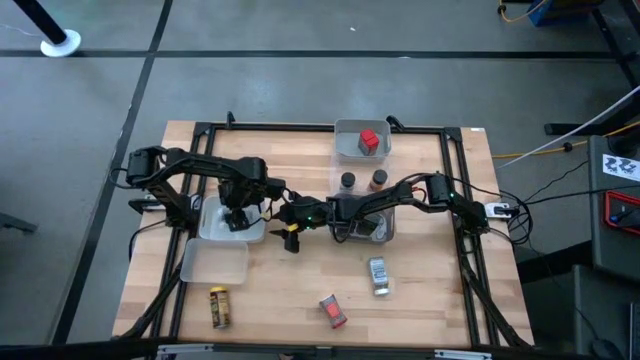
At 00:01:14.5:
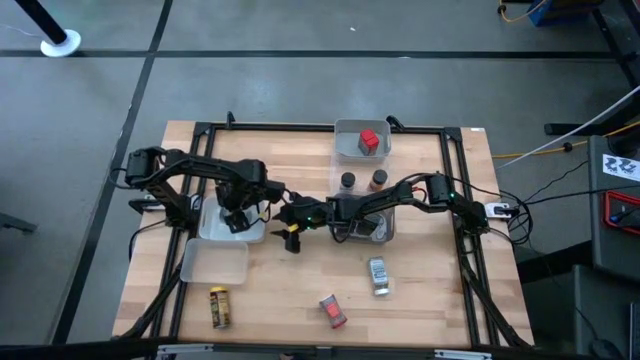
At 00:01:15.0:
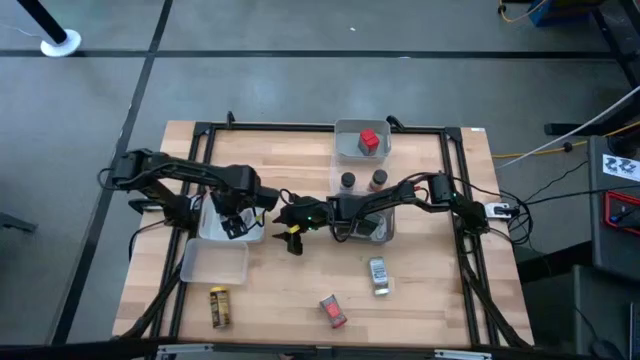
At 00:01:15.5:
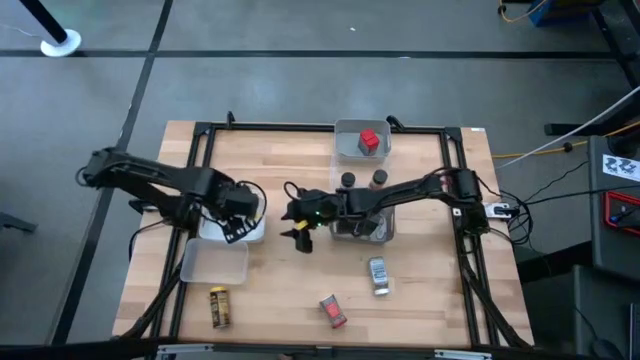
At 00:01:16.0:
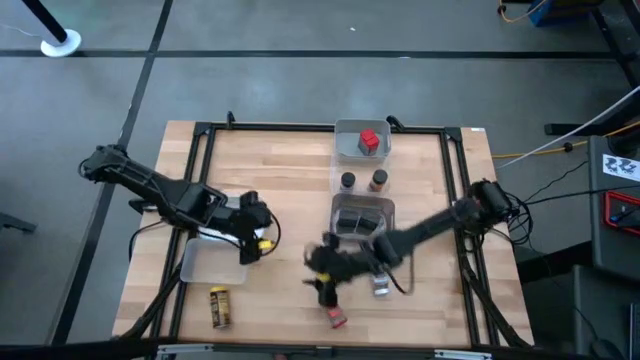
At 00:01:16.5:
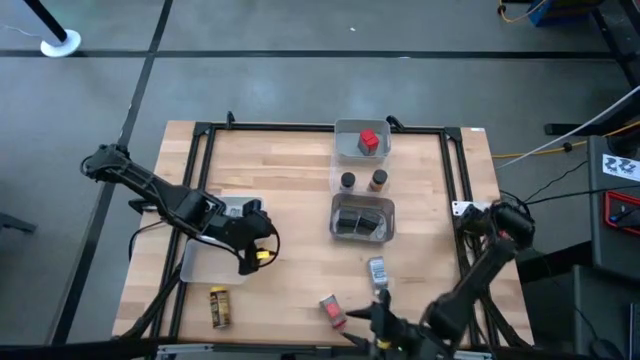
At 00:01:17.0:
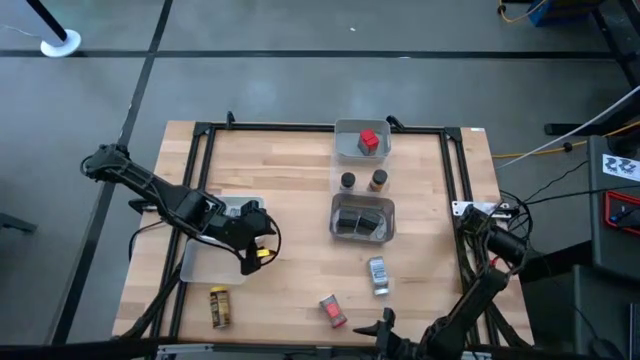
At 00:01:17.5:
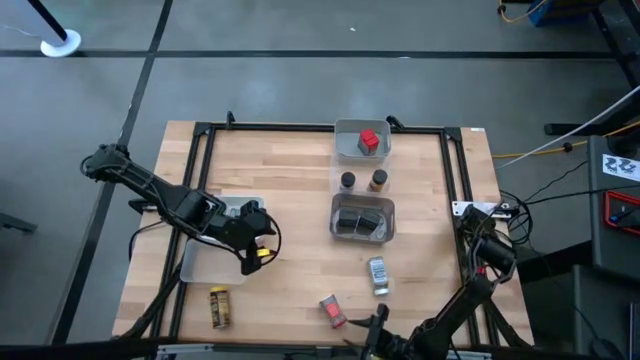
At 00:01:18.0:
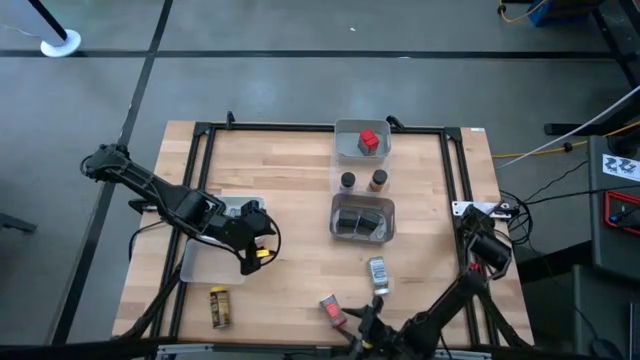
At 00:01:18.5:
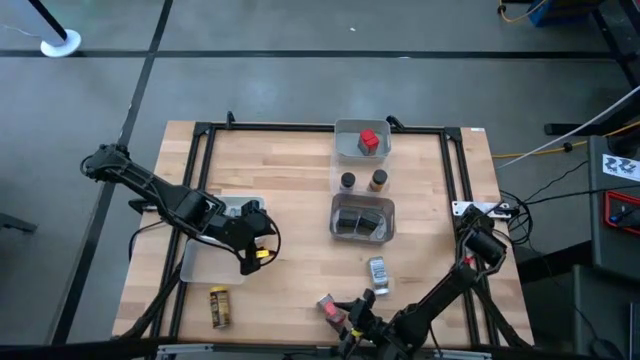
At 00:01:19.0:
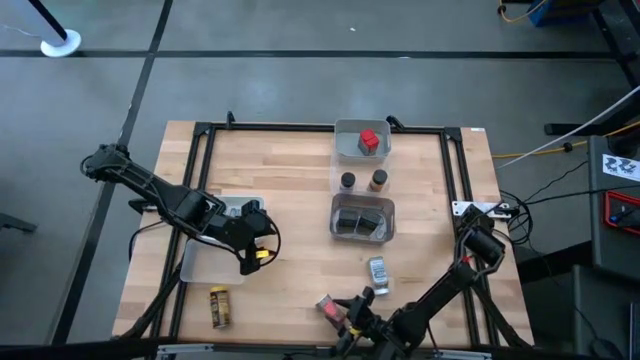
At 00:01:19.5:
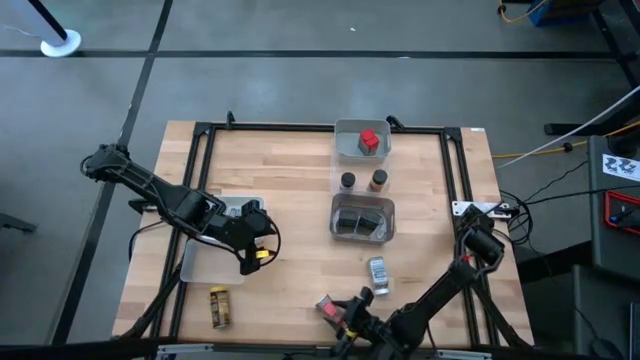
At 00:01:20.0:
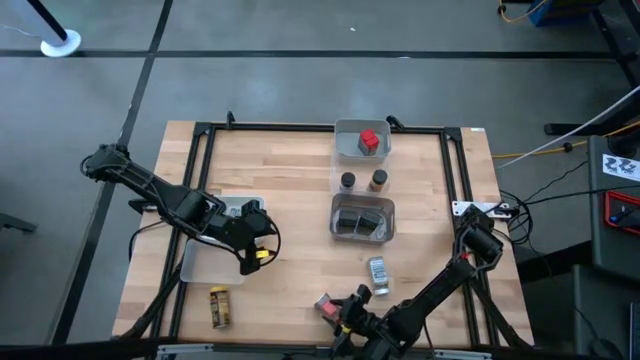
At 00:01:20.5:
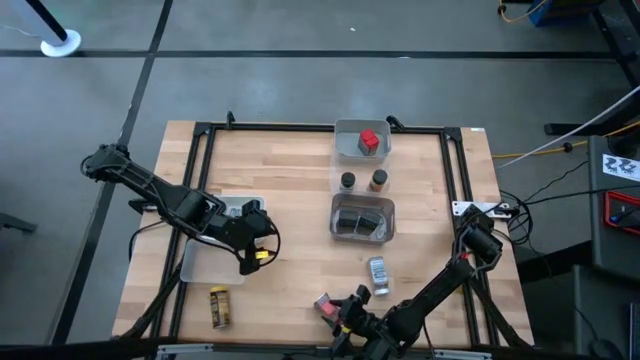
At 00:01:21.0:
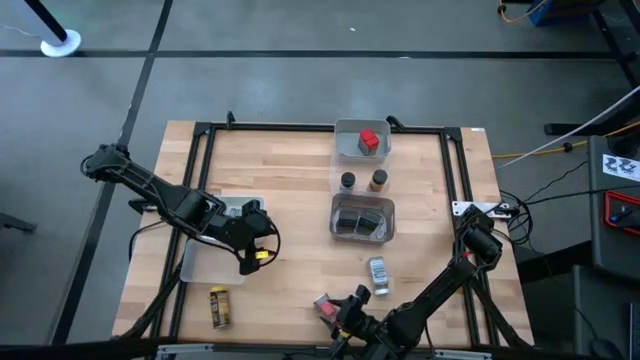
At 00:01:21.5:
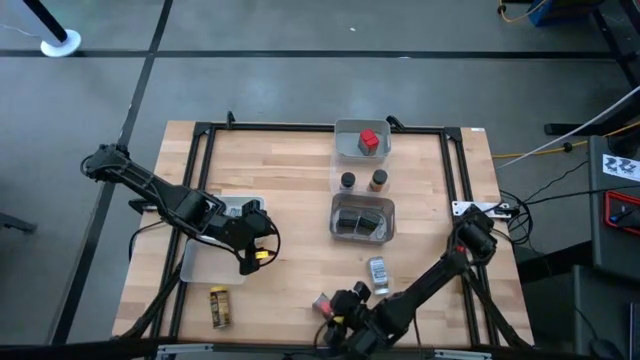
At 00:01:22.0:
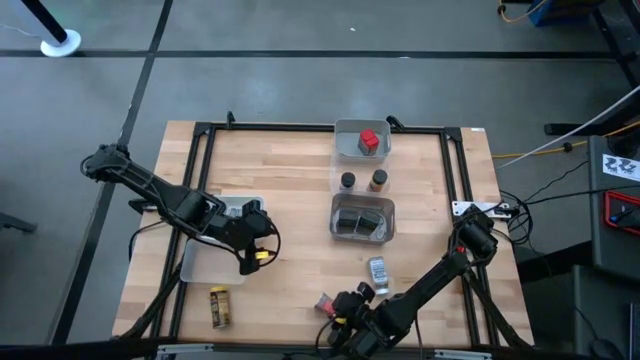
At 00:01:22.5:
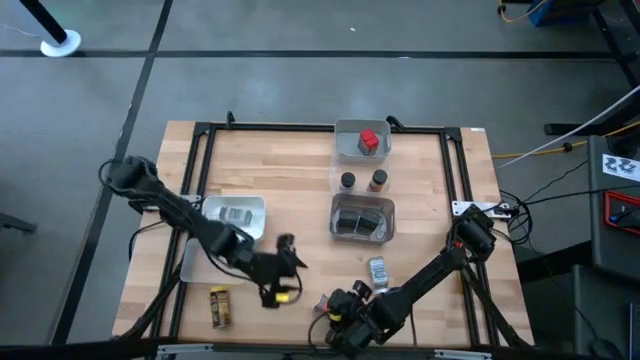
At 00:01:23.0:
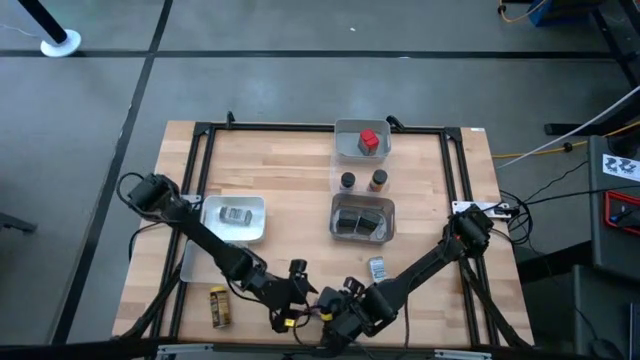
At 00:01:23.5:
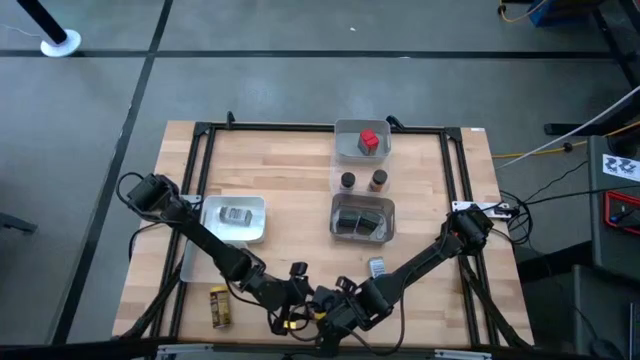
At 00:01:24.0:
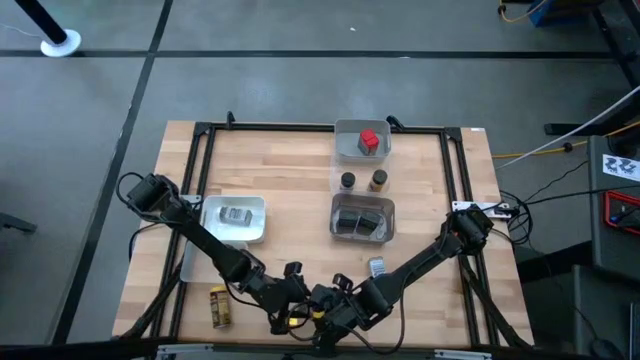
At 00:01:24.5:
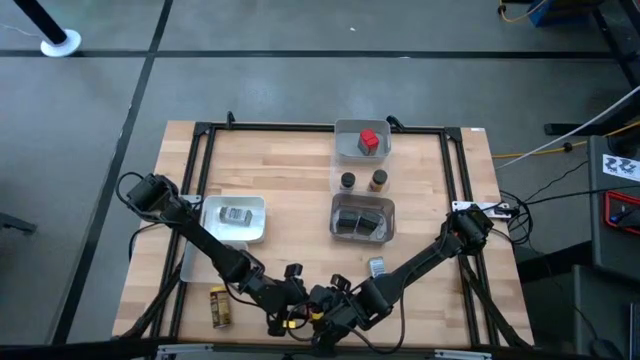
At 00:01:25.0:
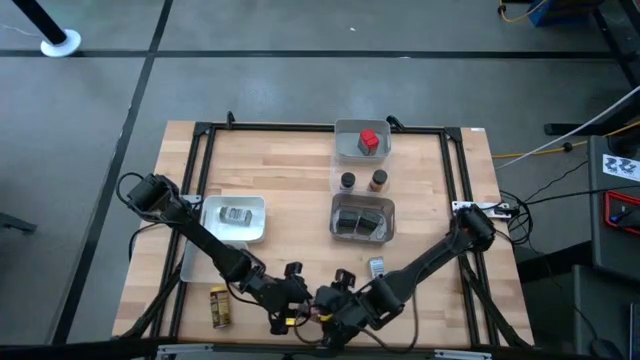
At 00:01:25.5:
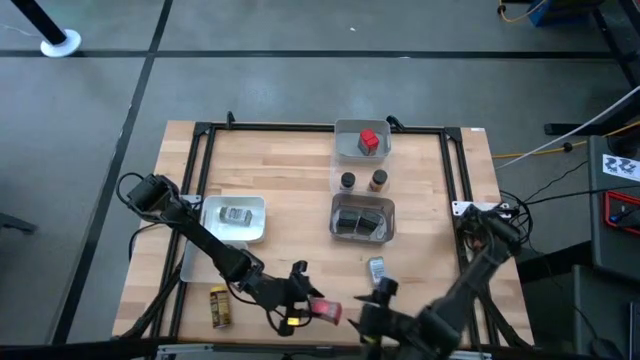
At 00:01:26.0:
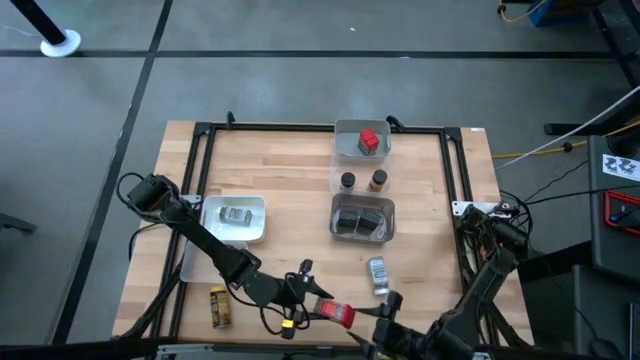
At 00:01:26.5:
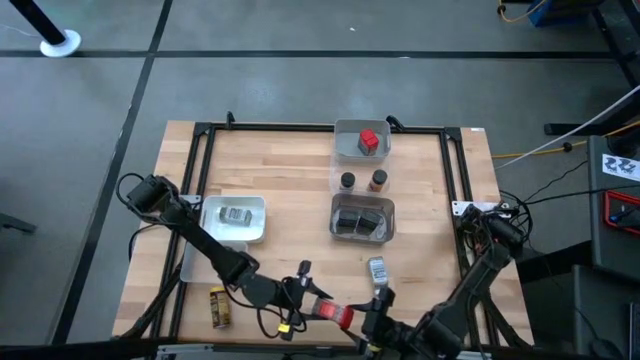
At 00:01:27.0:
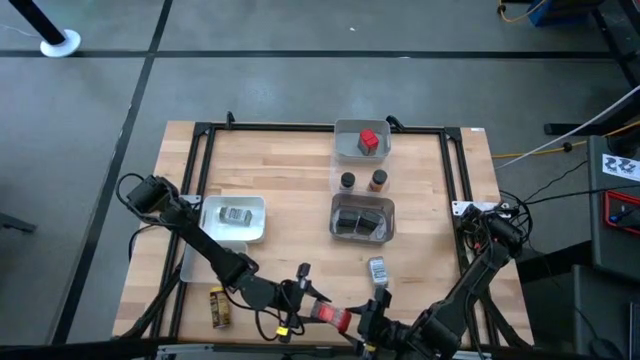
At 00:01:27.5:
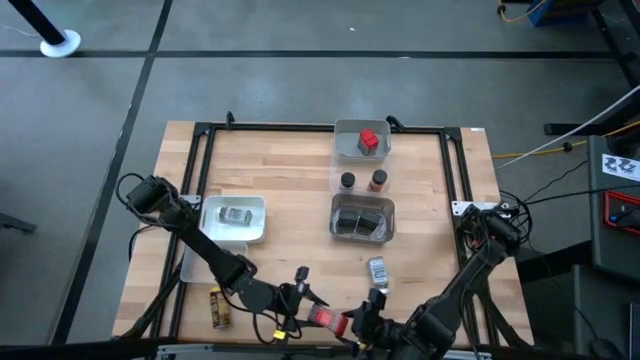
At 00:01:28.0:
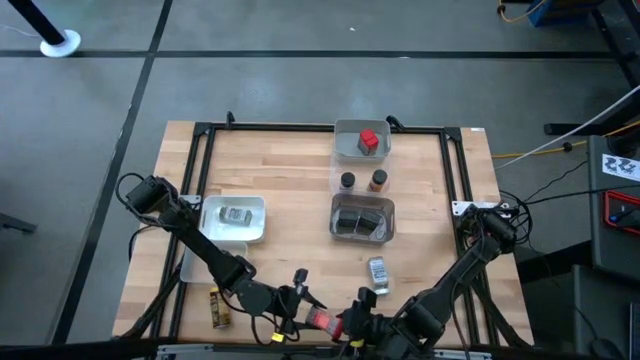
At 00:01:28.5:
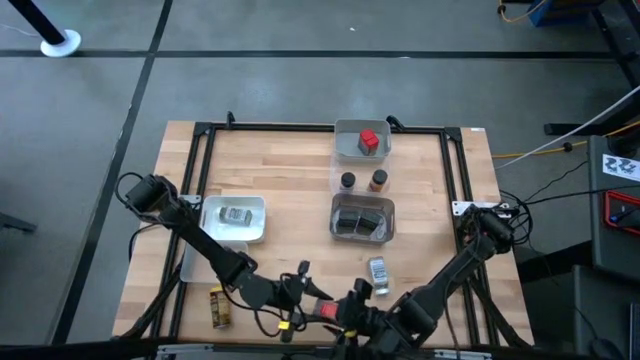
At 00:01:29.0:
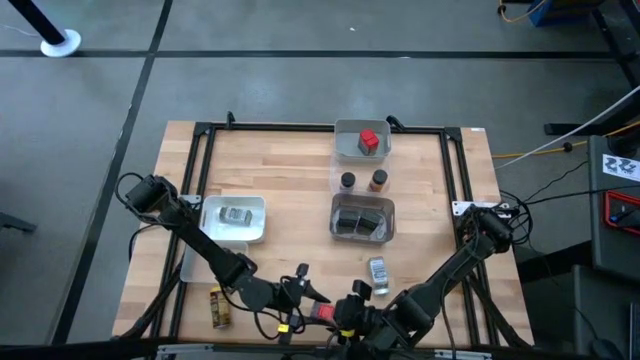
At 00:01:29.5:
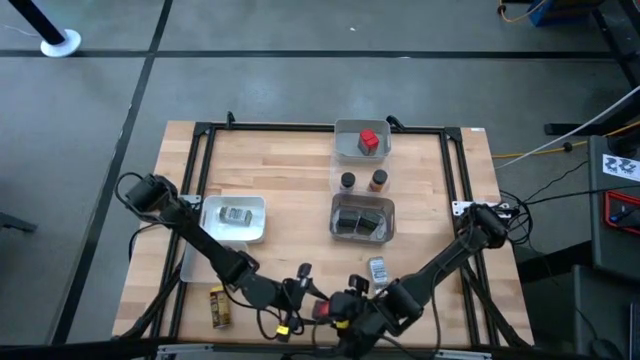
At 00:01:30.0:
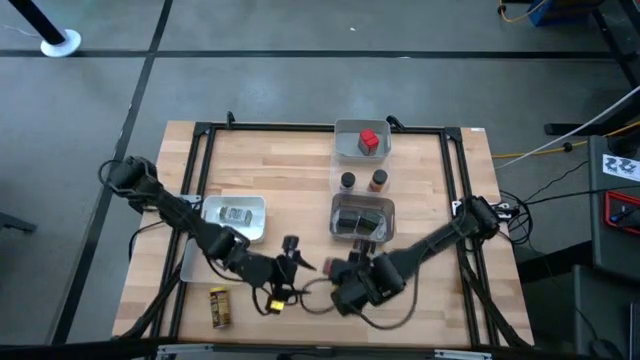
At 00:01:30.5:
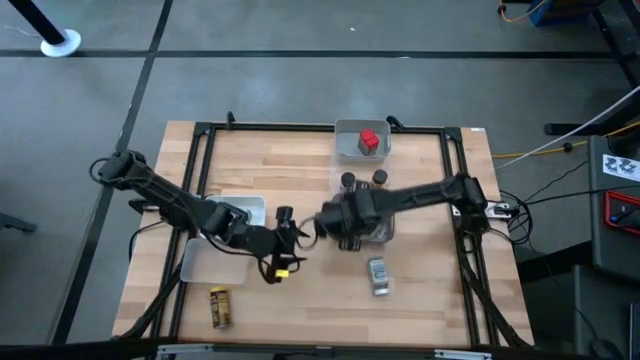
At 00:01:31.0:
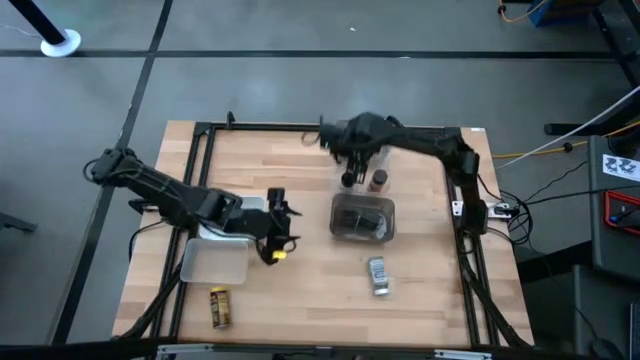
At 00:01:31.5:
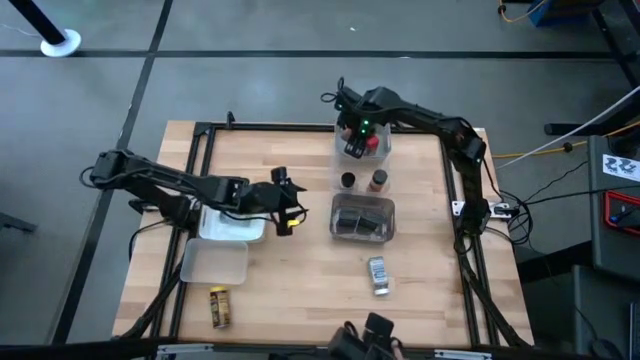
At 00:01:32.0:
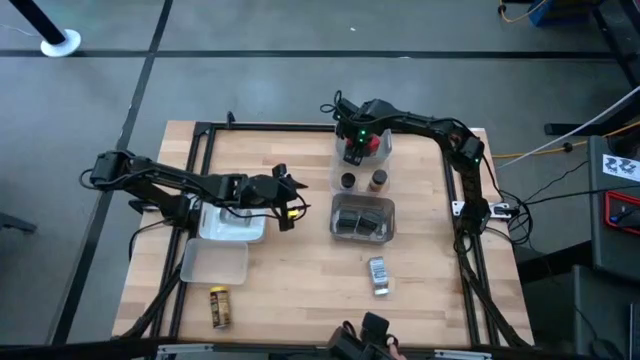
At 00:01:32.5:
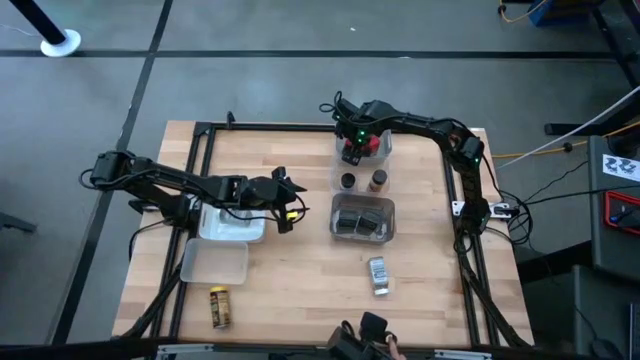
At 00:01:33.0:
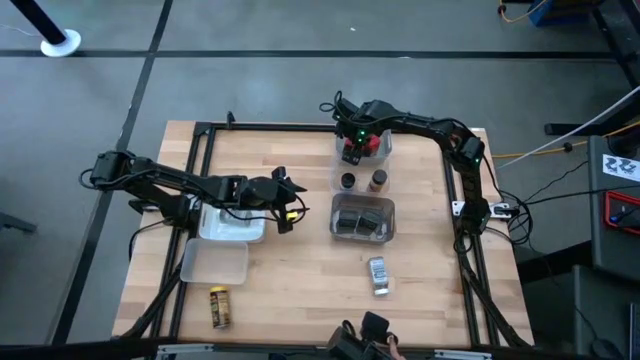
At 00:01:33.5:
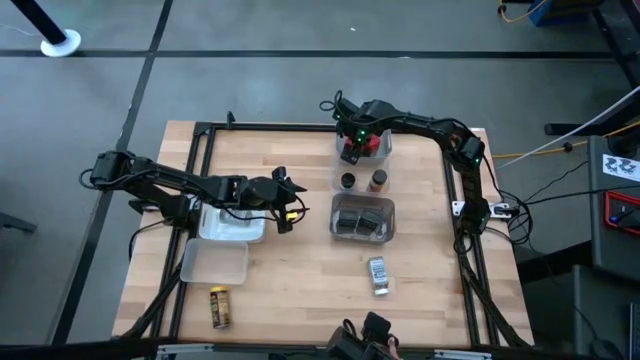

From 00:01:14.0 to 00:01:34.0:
Task: Sort spices by type
Put the red seasoning can into the gray bin
